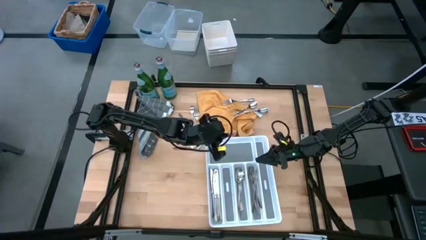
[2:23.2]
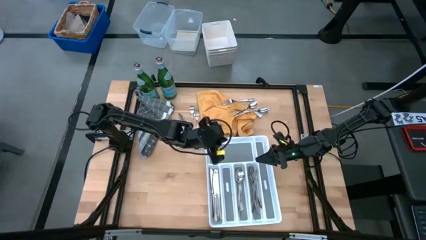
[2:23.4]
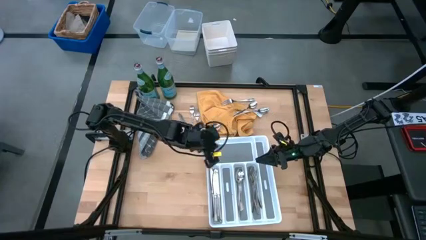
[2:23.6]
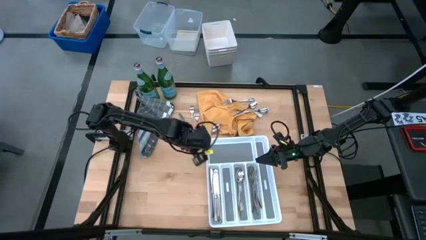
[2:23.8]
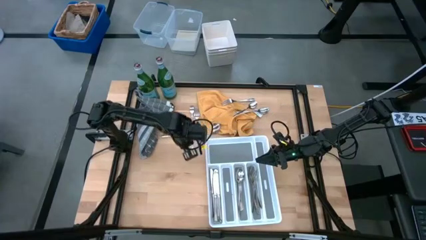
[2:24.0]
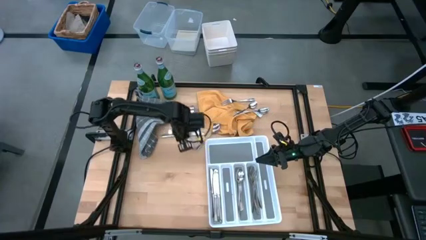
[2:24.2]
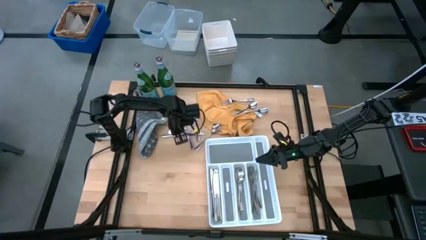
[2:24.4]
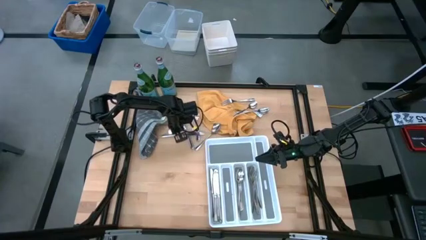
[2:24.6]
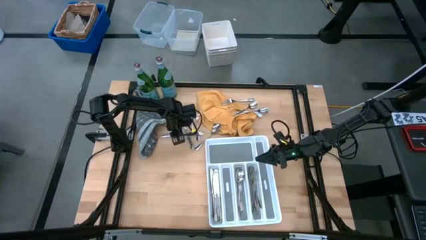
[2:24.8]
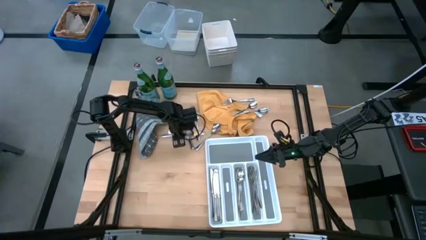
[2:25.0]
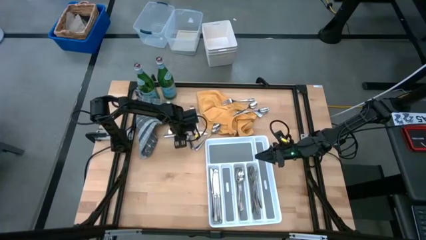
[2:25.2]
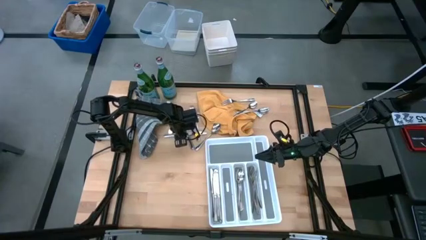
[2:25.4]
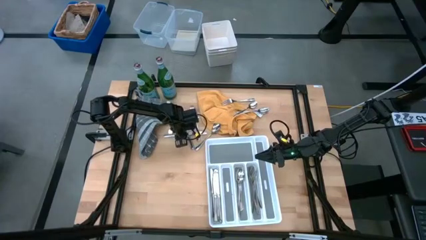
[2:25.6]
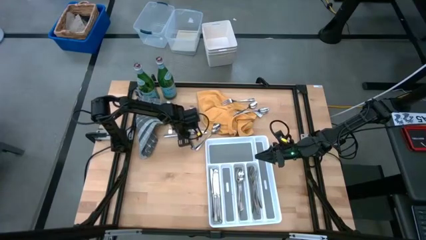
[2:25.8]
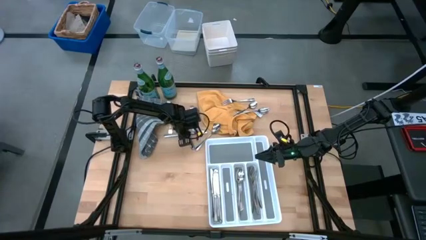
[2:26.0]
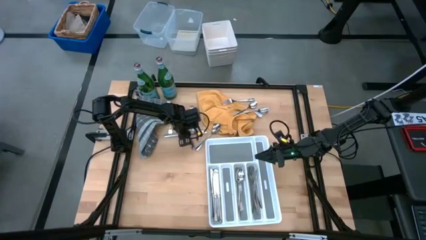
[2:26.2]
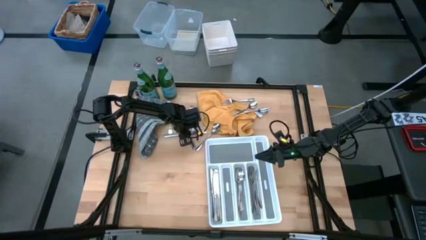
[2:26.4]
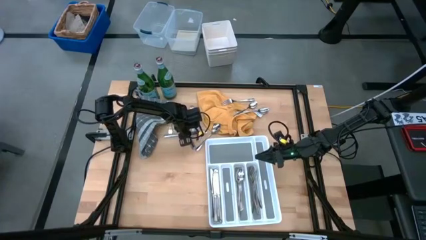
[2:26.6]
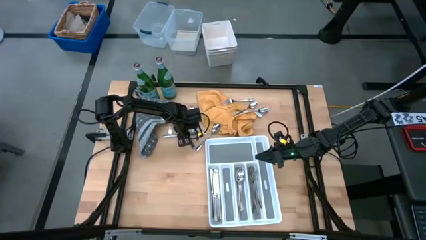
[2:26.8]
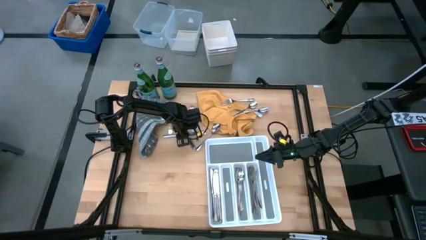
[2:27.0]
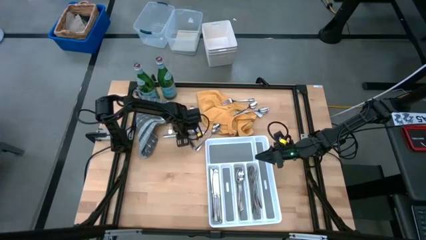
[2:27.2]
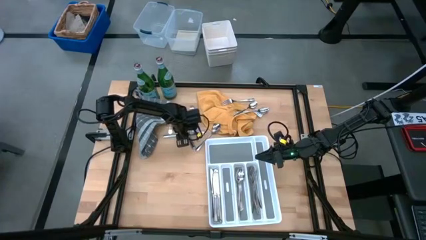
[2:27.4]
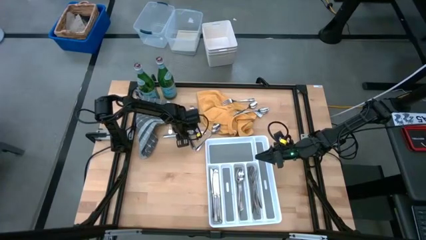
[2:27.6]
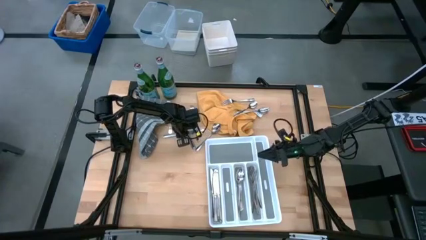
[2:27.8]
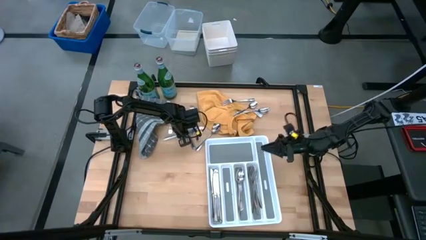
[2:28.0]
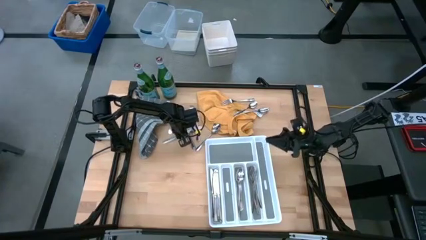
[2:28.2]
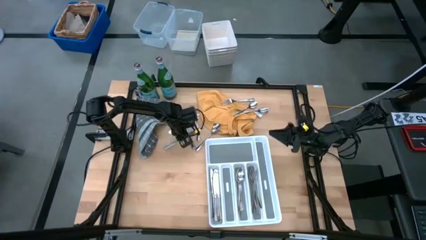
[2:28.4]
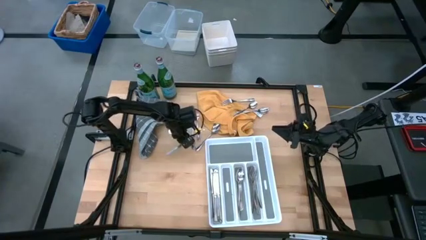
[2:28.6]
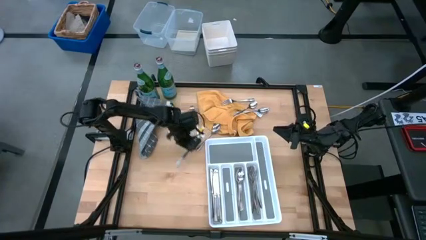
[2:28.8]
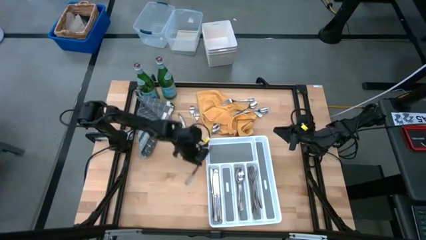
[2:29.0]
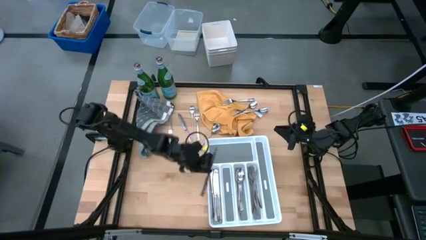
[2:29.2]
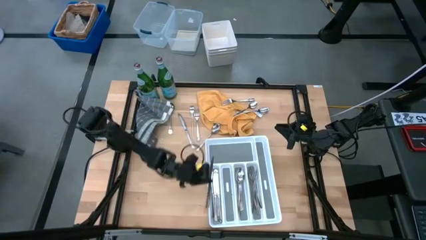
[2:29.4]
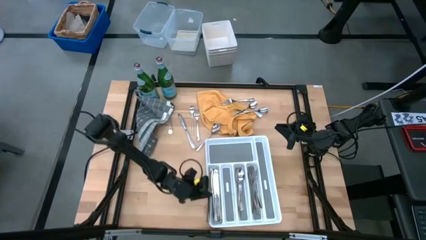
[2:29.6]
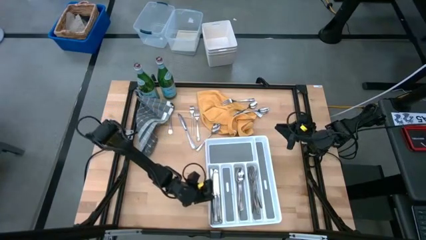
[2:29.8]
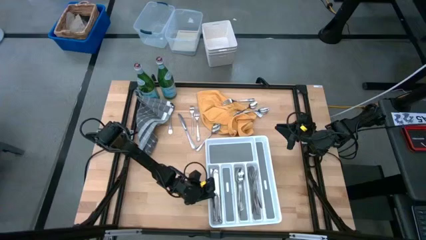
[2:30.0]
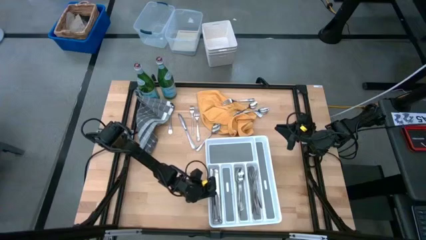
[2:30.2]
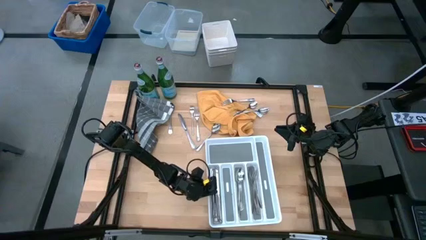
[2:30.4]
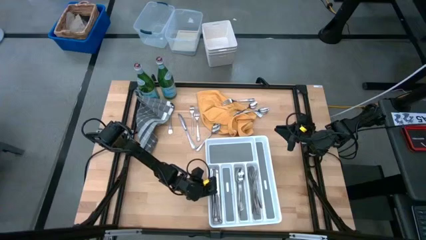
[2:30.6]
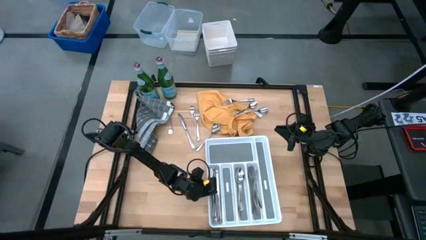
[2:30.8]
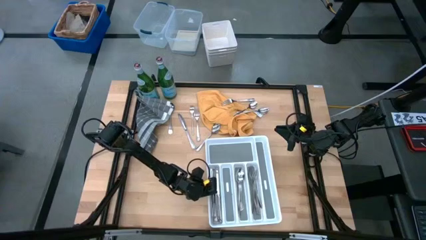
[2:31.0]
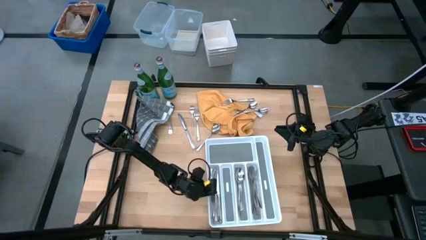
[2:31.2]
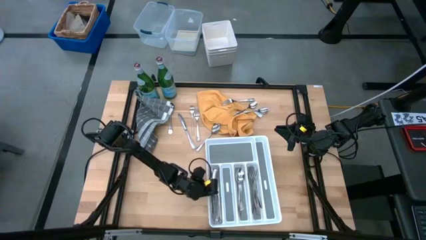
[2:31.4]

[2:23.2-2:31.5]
Task: Sort silverware
Put the table knife into the silverware tray

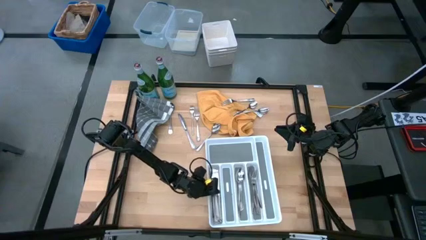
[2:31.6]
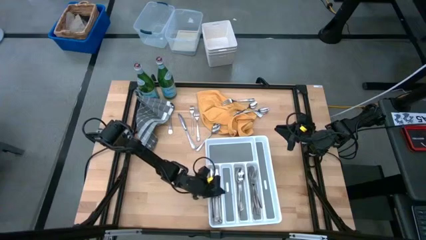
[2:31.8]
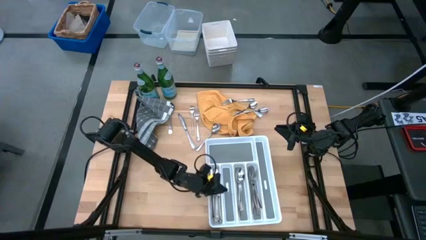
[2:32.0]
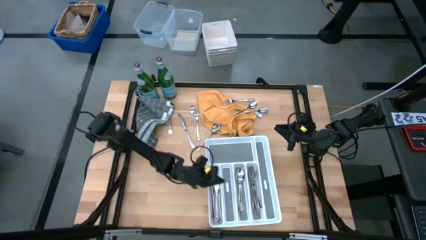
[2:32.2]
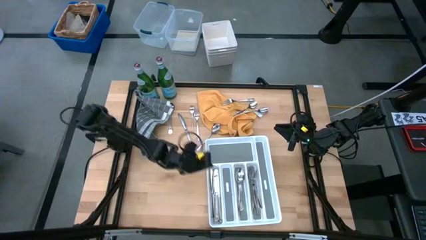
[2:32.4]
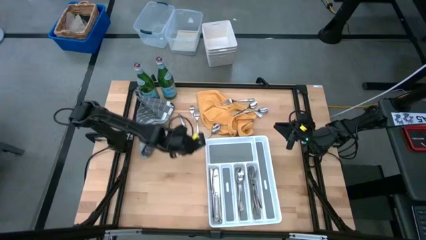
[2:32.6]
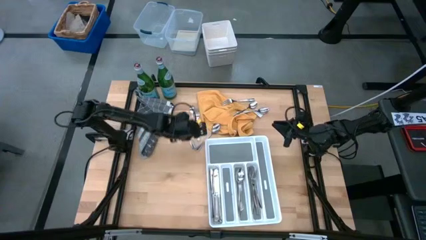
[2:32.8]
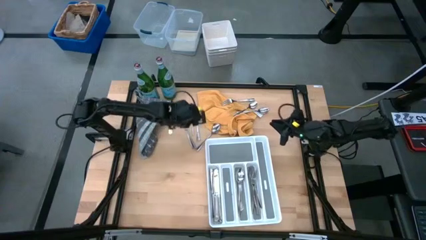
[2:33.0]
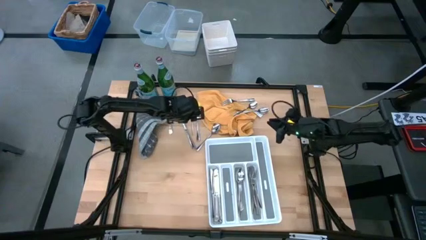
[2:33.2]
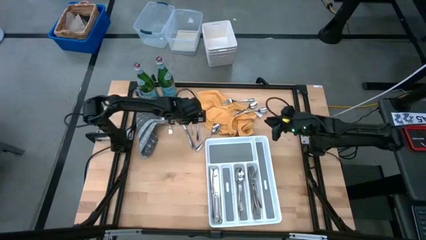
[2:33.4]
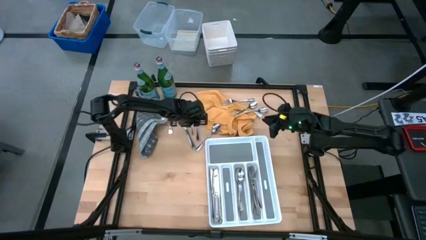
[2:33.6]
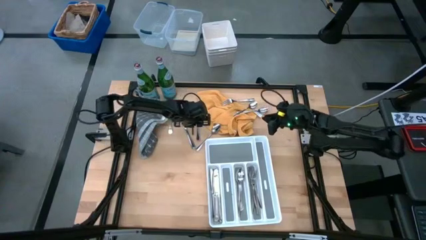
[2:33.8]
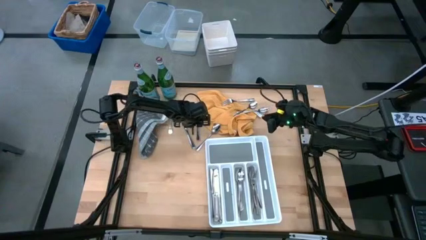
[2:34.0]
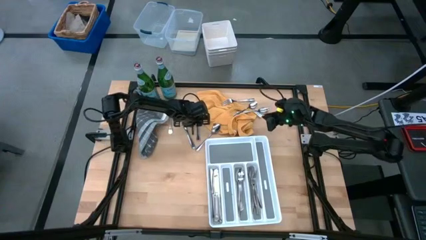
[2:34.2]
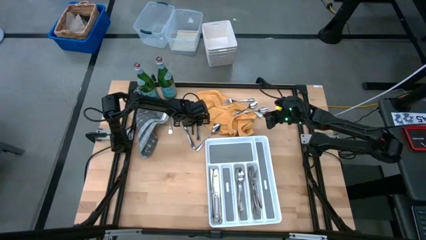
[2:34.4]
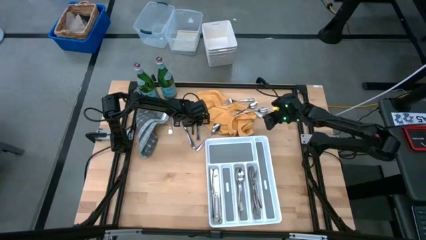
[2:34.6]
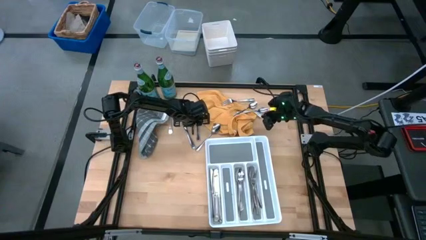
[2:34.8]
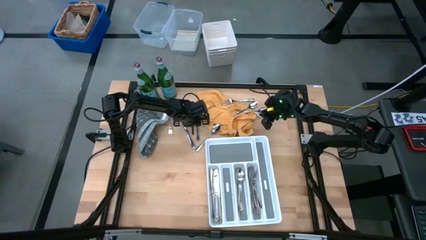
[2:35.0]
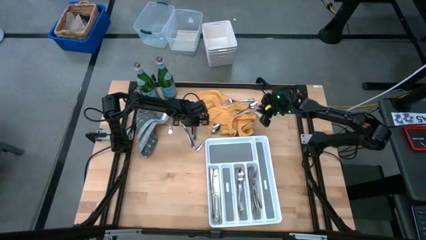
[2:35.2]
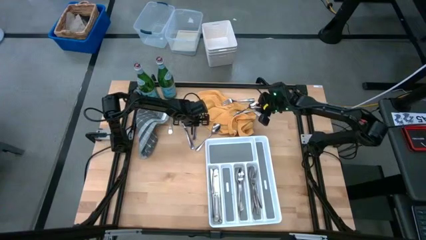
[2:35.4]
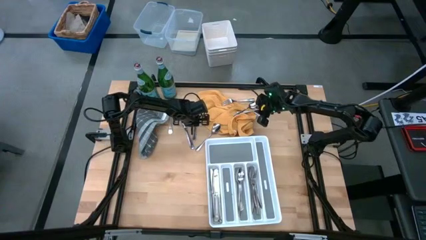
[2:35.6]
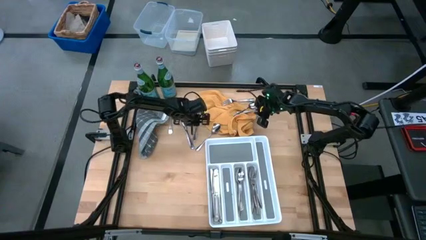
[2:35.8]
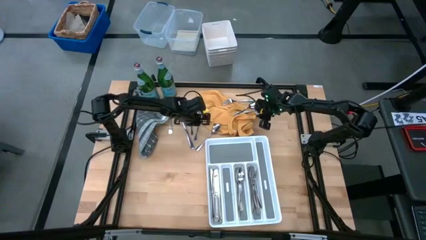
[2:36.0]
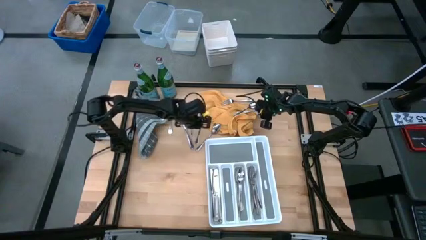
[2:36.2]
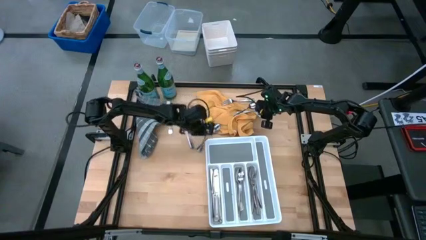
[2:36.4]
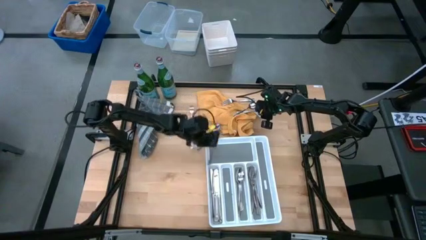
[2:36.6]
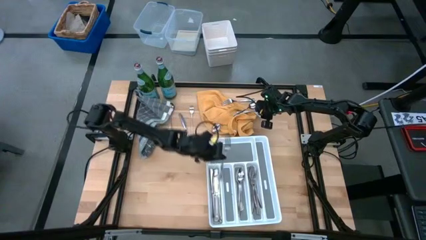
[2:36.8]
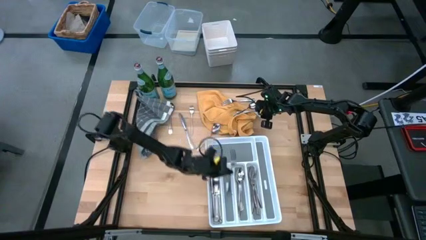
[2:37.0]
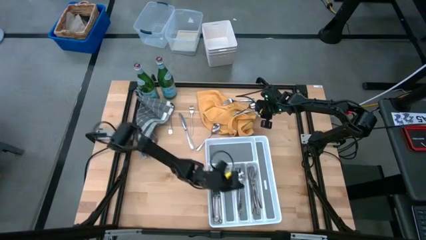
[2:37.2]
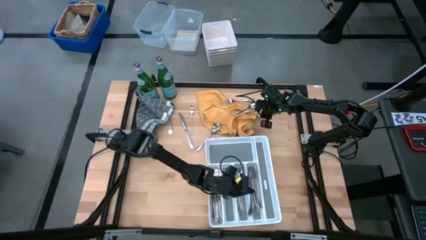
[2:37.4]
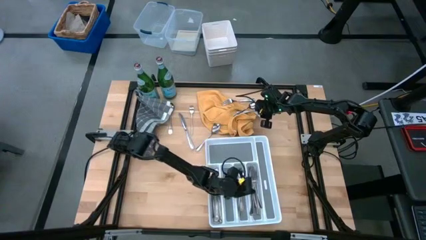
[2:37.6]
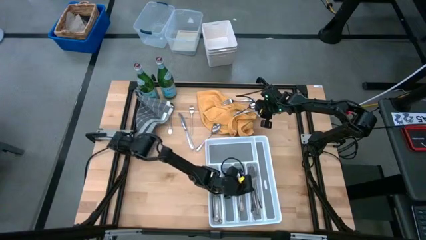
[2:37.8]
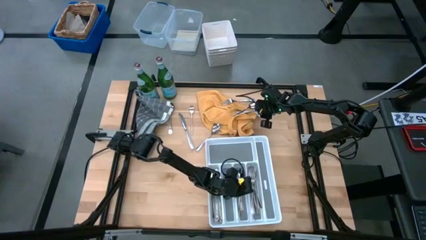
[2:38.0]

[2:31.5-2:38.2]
Put the fork into the silverware tray
